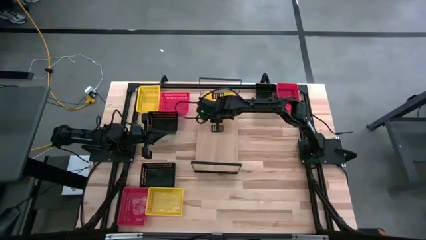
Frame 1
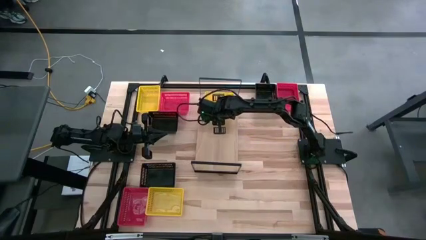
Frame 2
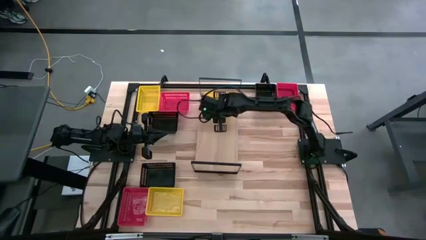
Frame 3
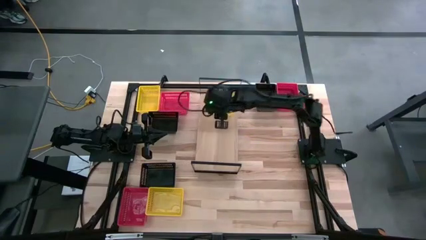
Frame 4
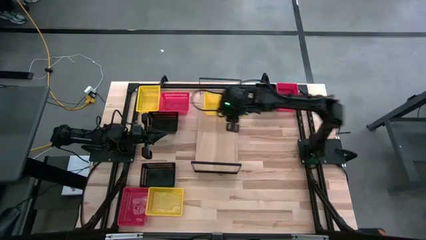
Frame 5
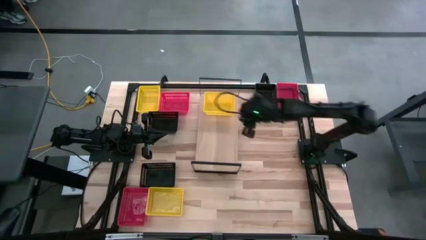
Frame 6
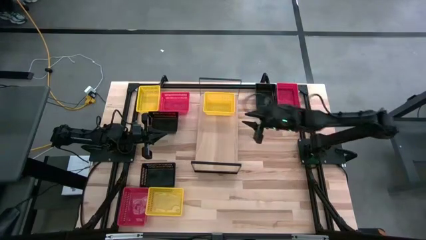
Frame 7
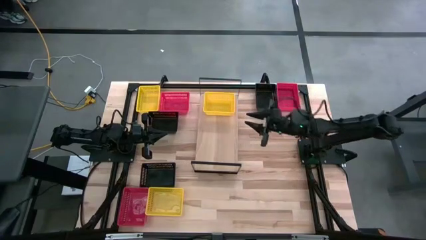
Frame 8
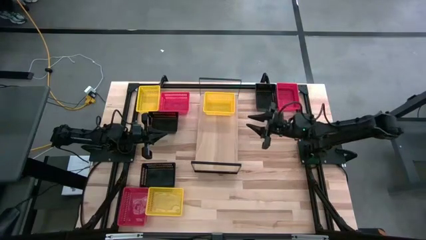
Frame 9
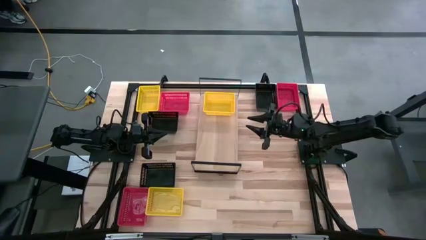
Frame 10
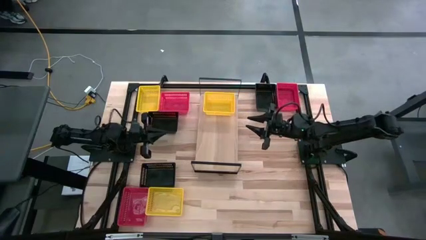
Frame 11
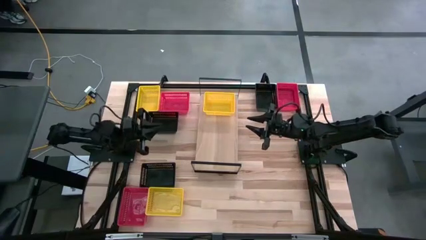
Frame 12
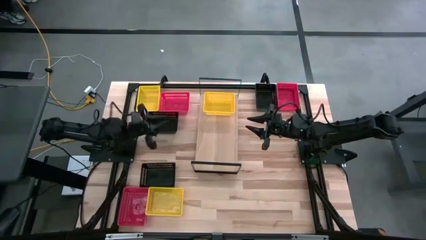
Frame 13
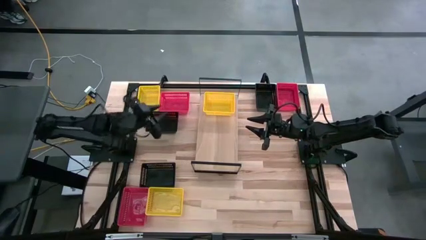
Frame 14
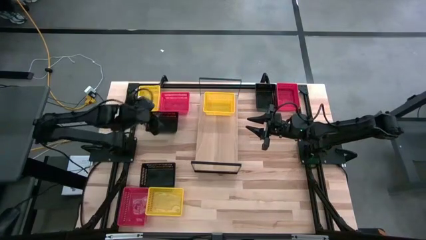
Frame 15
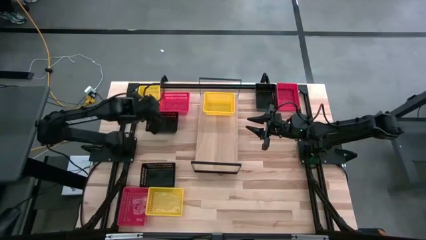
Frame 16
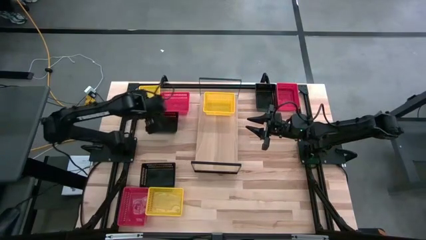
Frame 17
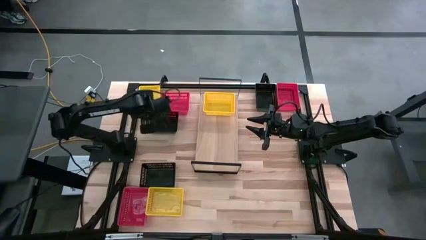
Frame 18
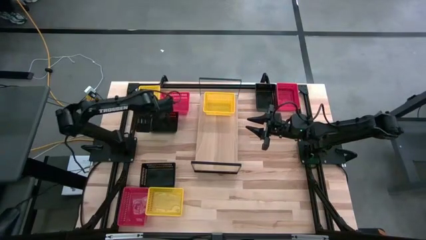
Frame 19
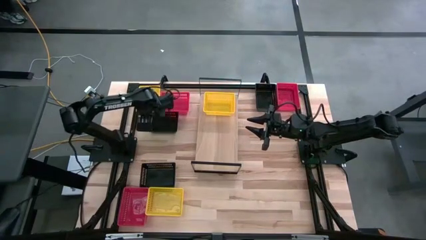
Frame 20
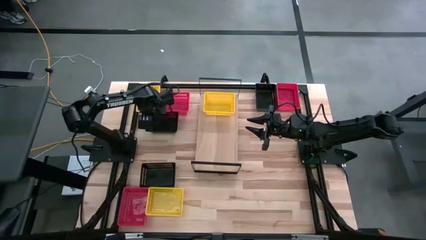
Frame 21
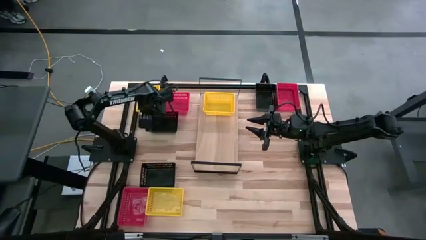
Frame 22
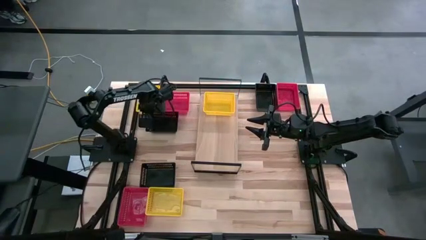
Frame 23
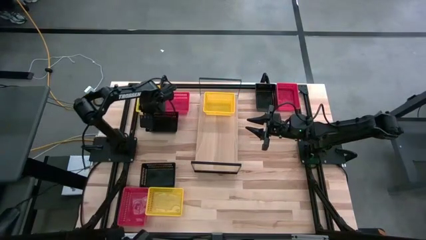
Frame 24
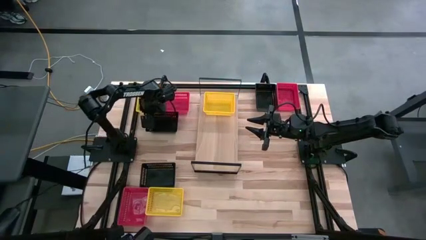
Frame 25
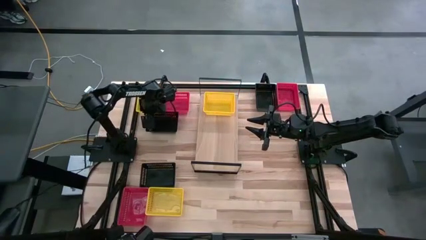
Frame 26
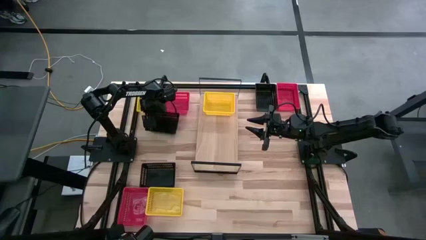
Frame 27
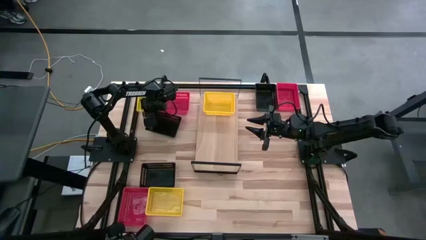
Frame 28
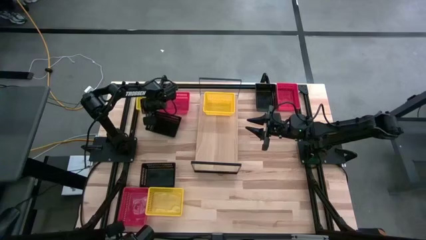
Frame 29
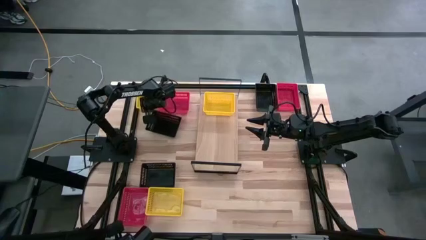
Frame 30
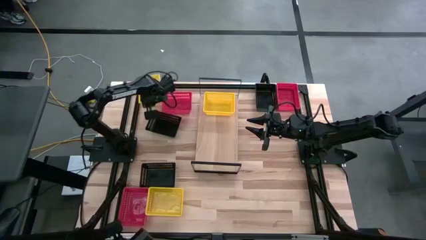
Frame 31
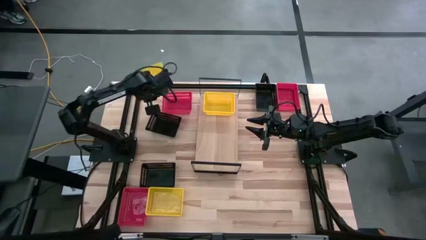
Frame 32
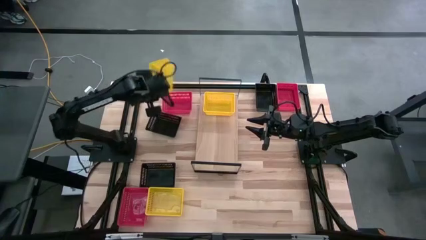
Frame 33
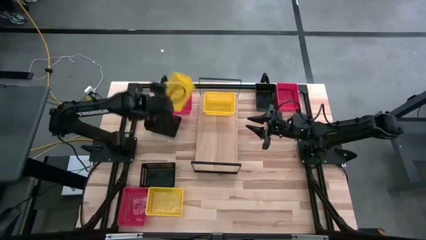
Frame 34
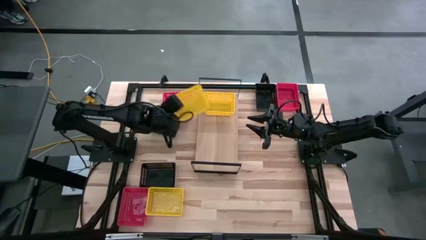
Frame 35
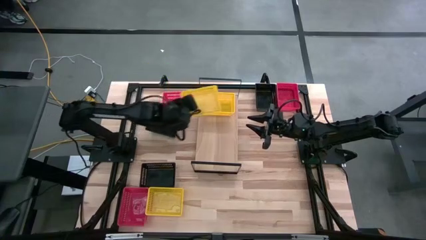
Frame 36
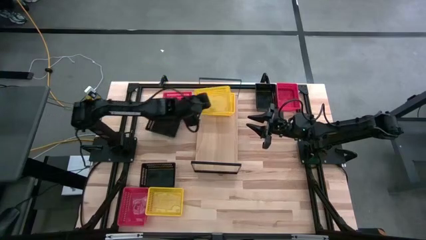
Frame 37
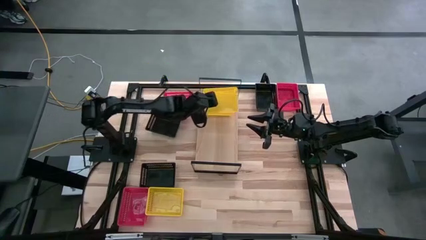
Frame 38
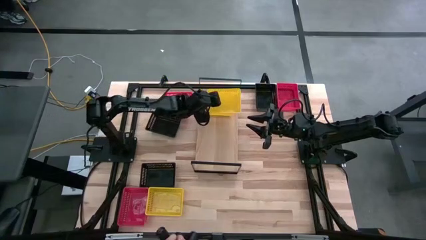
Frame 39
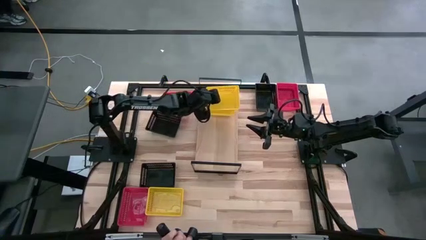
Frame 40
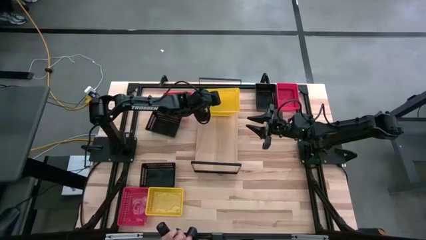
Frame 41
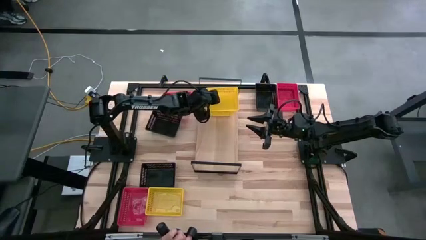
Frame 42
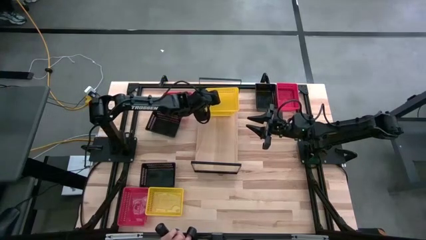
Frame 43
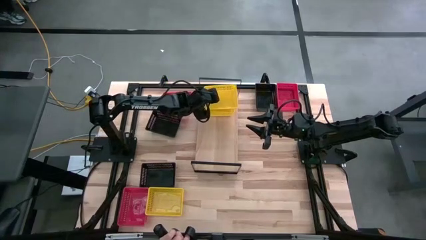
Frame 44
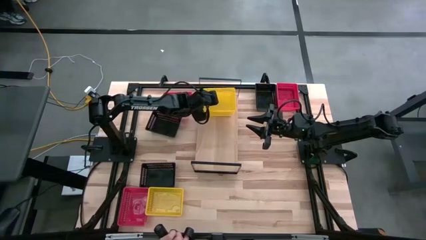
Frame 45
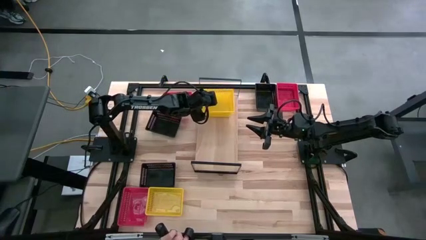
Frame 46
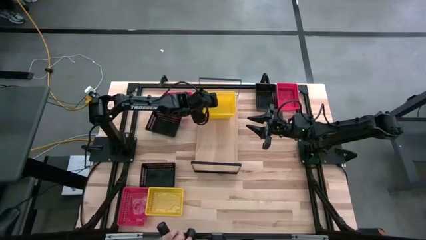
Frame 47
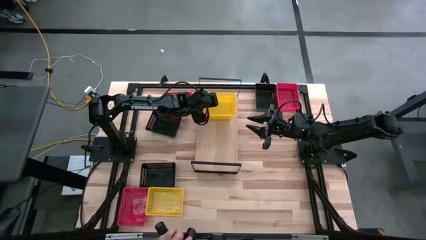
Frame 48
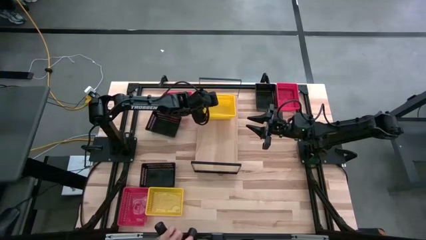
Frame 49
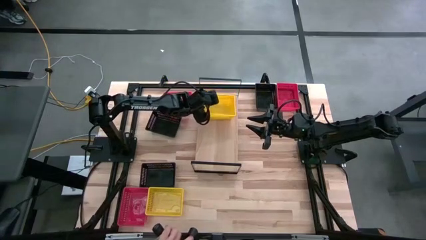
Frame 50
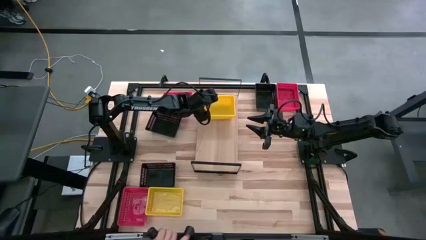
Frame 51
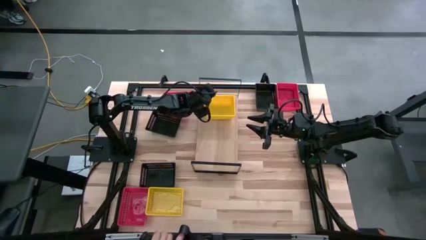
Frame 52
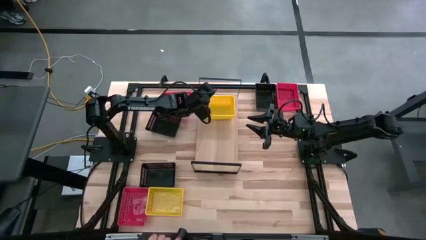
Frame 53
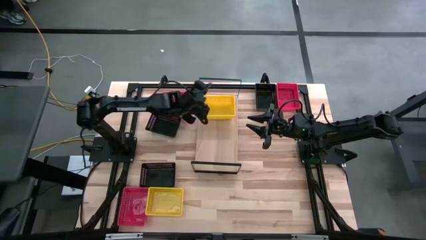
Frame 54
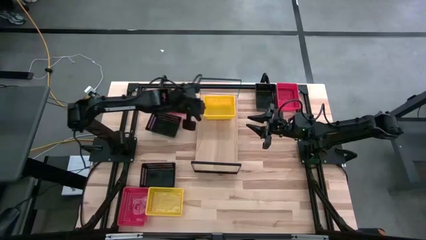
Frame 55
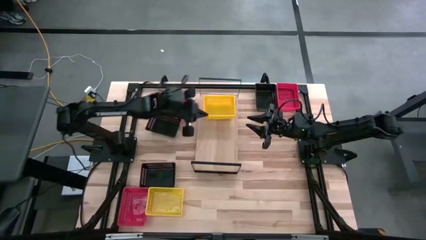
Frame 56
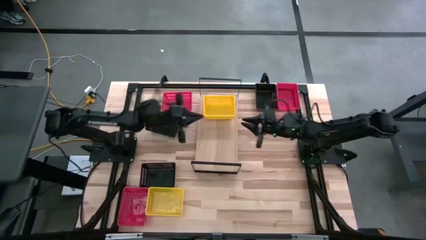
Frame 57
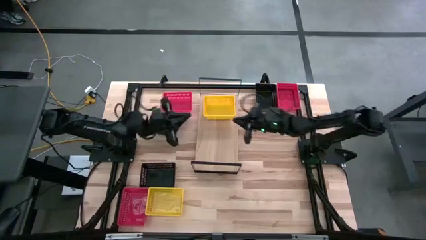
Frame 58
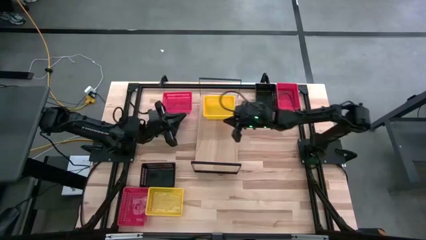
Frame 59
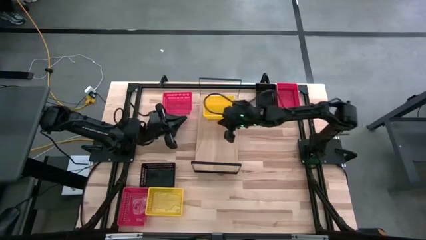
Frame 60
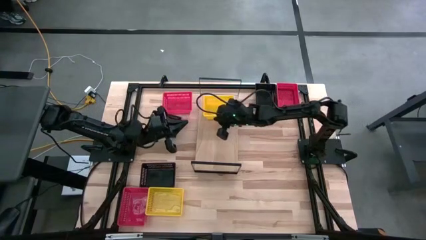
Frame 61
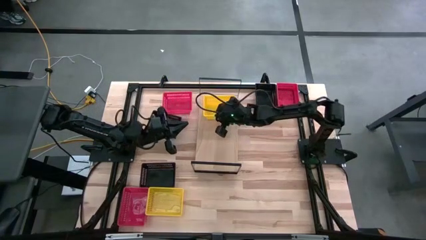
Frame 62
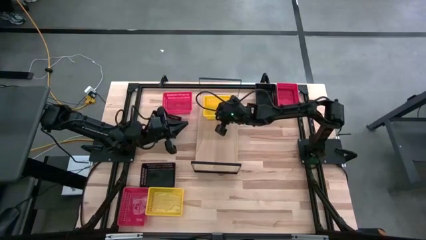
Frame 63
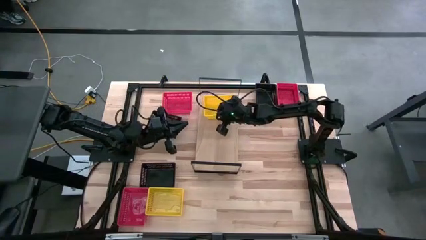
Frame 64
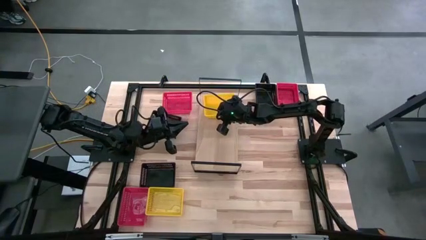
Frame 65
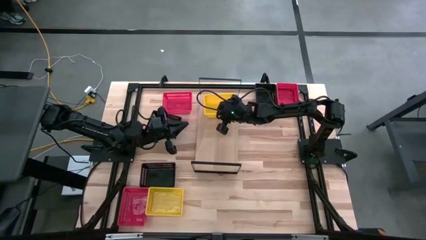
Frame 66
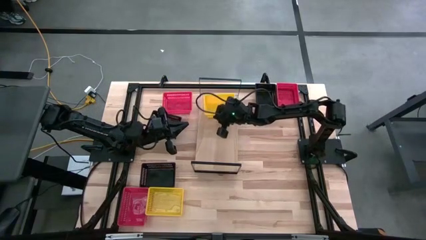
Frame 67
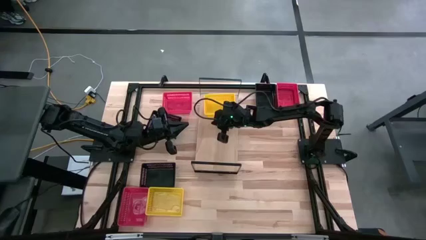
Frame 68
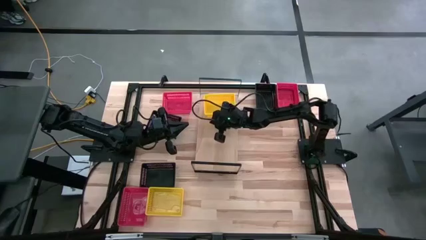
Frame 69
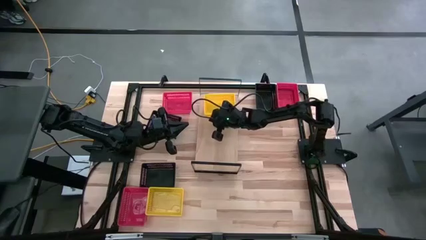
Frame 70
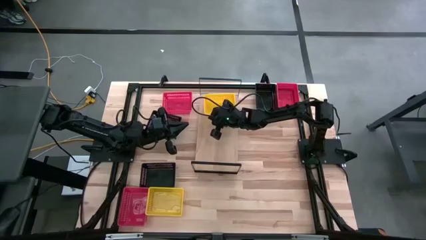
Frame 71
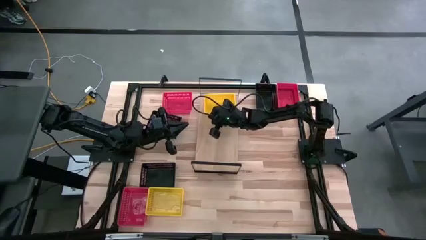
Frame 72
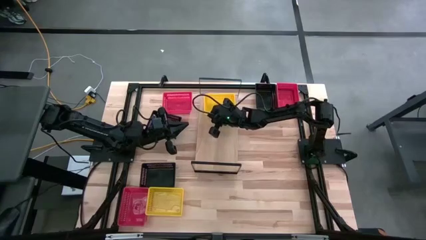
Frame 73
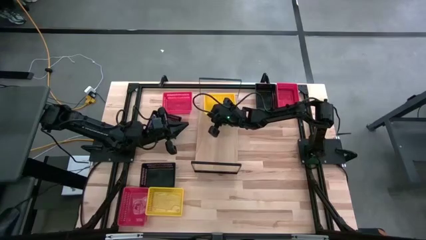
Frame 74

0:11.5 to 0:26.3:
Task: Stack baskets on shelf by color
Stack the top yellow bin on the yellow bin on the shelf
